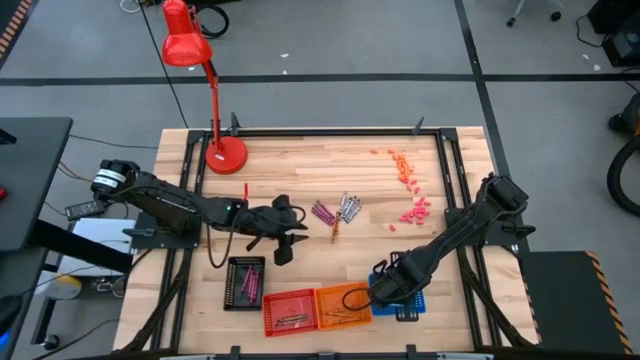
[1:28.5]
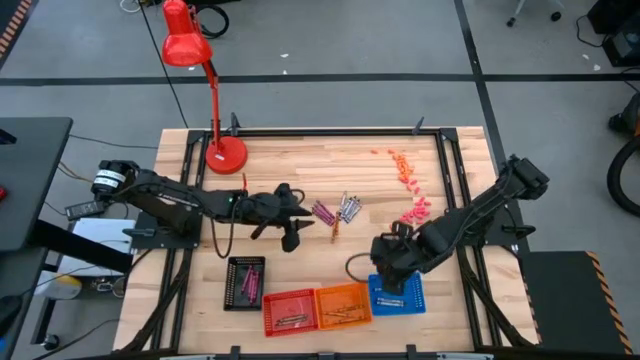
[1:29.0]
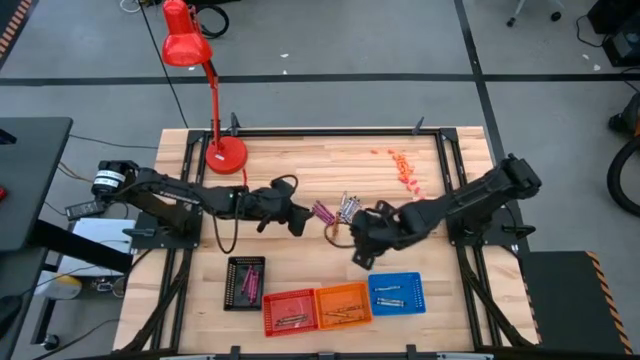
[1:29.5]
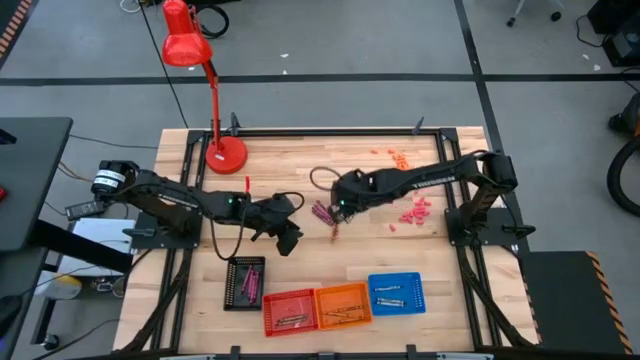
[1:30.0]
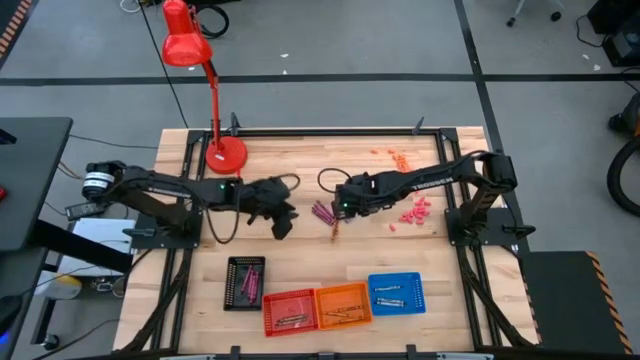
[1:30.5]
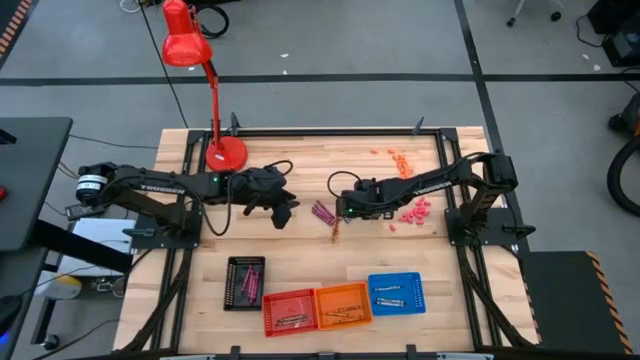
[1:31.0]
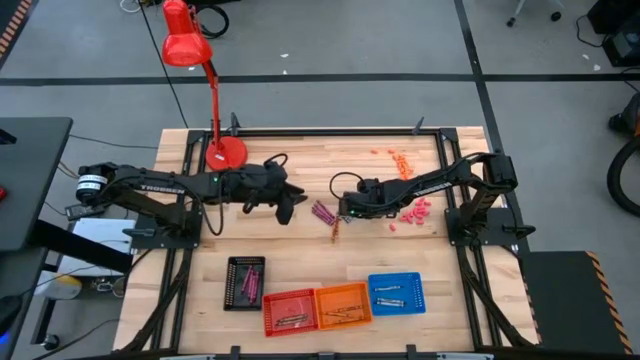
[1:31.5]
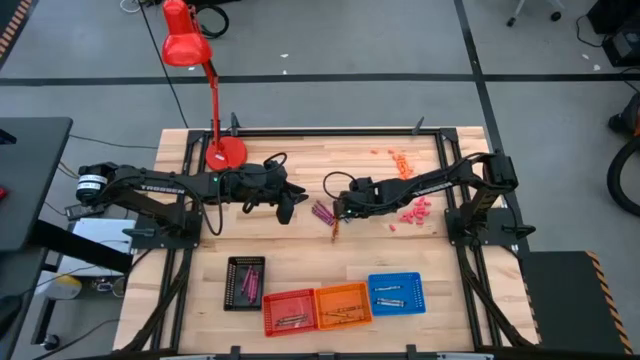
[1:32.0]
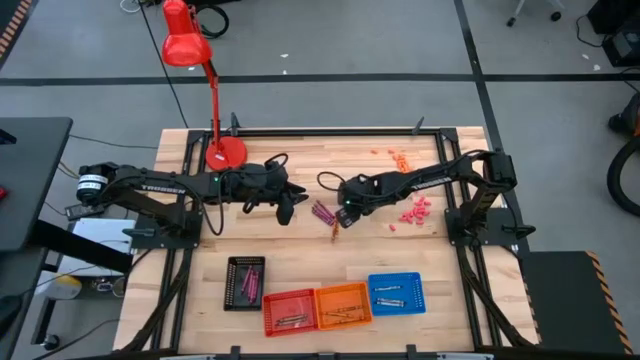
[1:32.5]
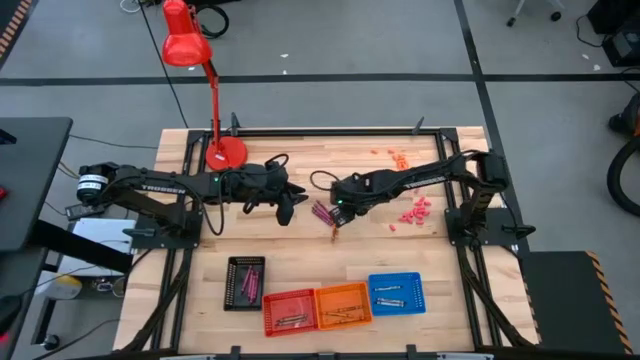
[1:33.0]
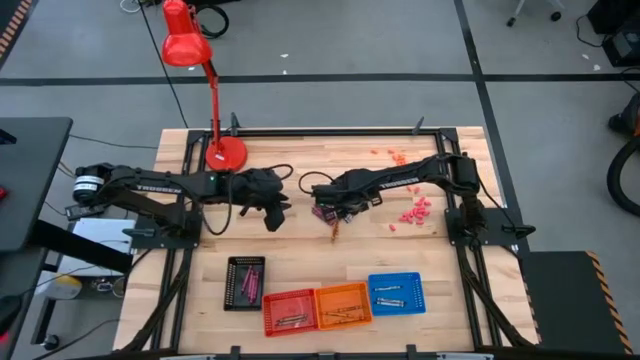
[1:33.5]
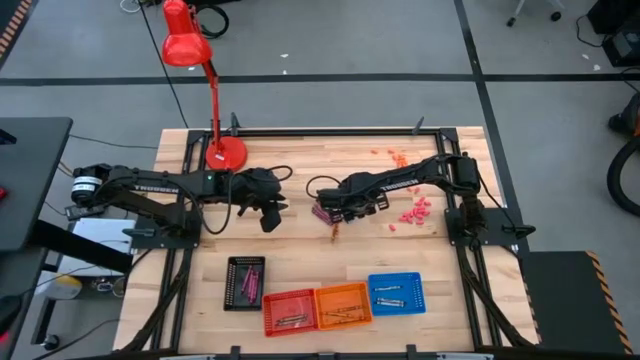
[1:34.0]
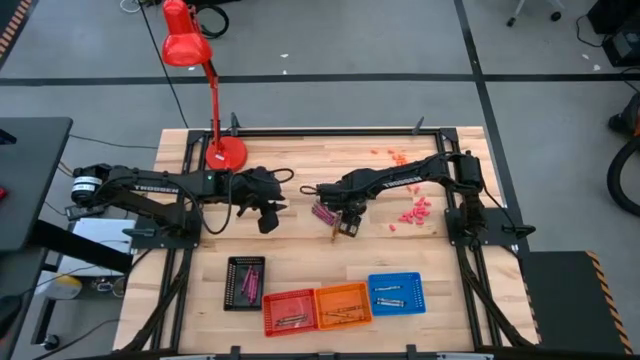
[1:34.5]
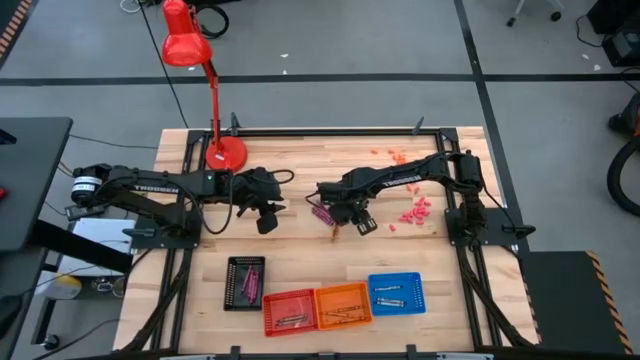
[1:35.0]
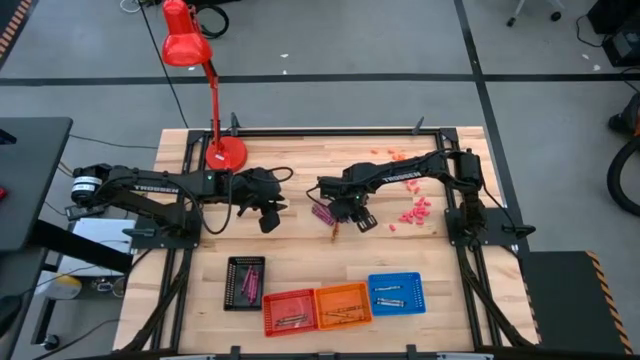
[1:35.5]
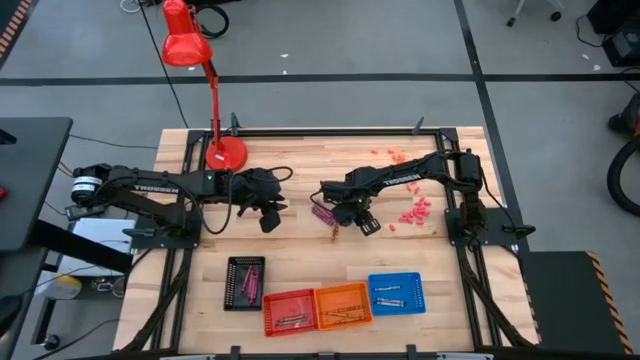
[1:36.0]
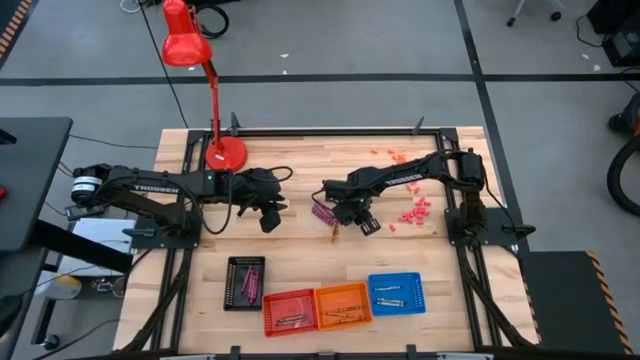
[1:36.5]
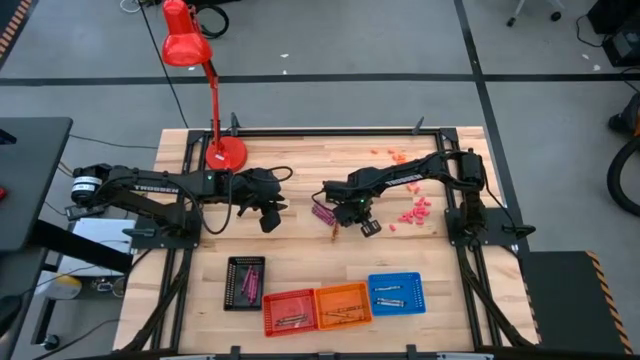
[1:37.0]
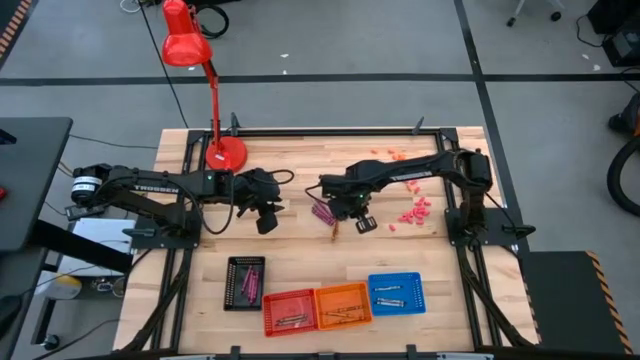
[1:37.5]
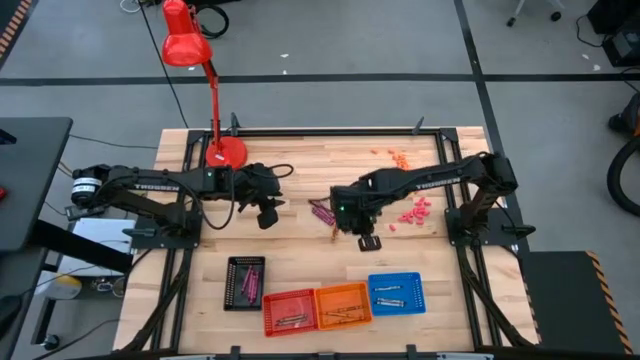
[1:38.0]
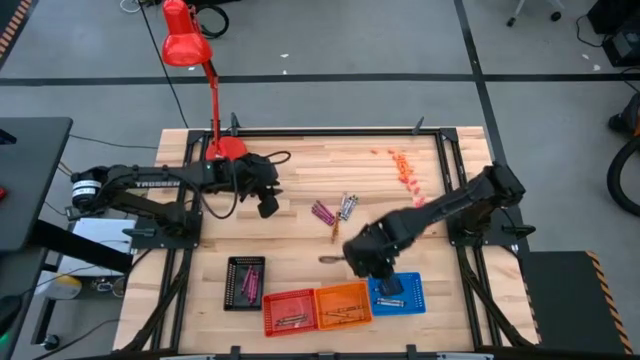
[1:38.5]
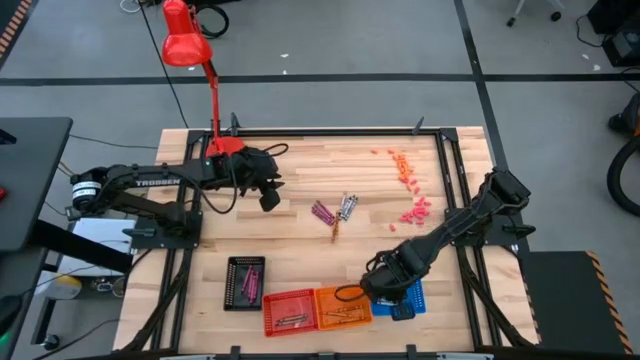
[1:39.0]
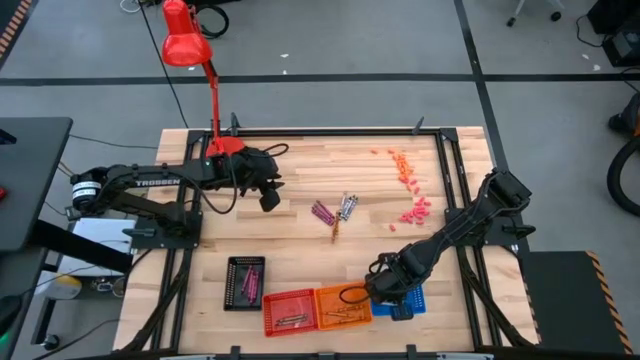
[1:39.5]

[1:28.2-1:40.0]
Task: Sort crayons
Put the black crayon into the blue bin

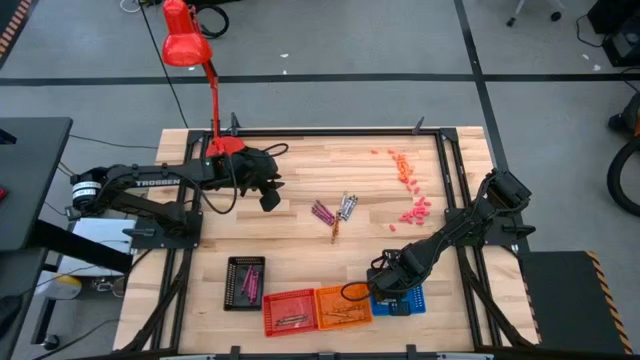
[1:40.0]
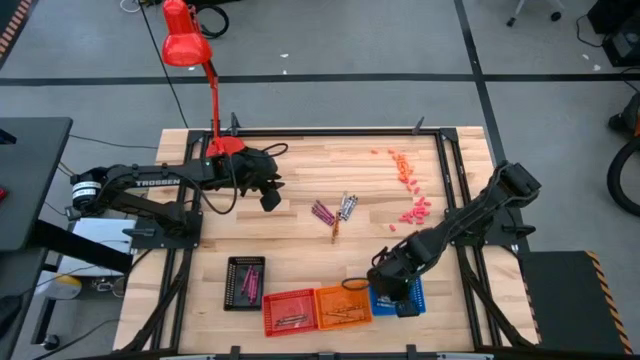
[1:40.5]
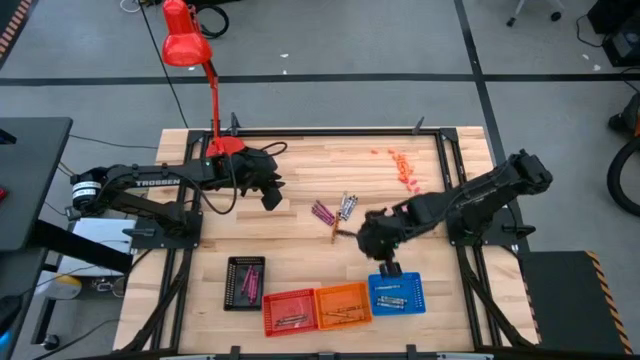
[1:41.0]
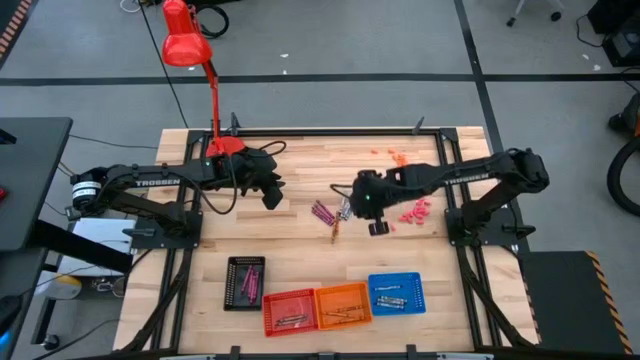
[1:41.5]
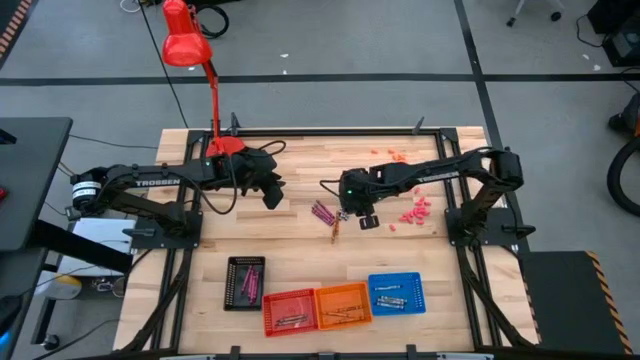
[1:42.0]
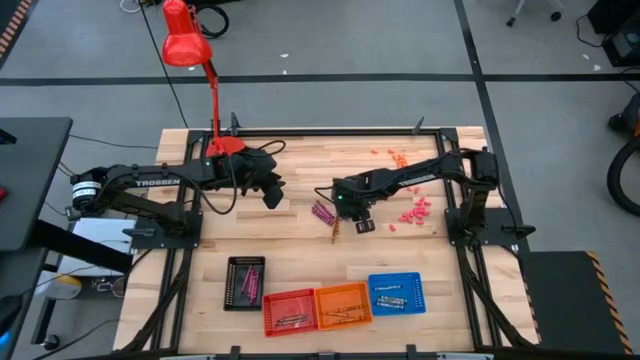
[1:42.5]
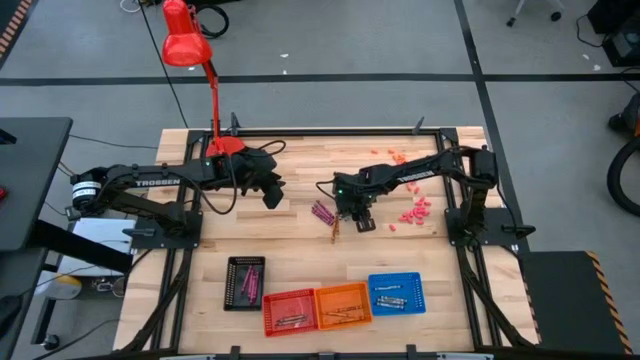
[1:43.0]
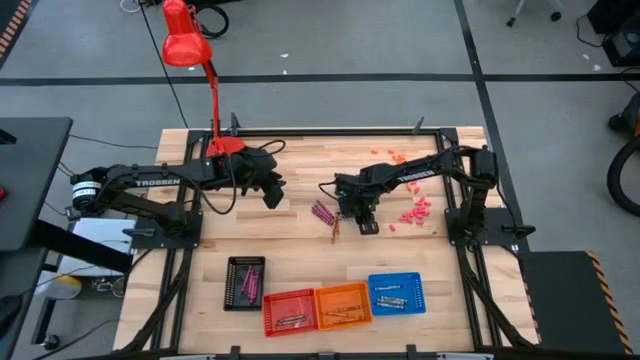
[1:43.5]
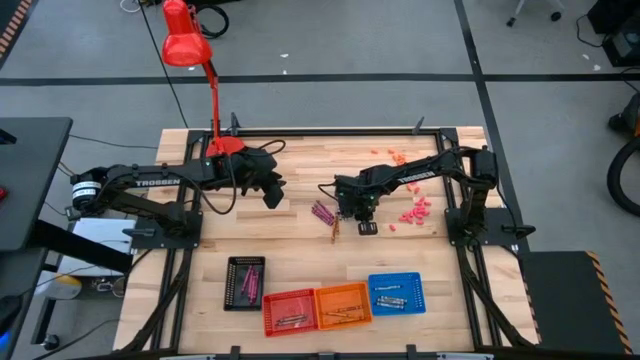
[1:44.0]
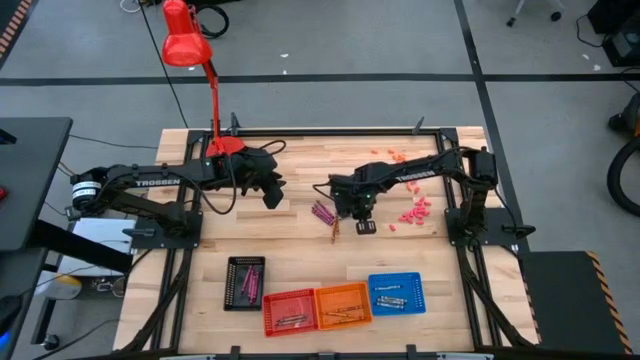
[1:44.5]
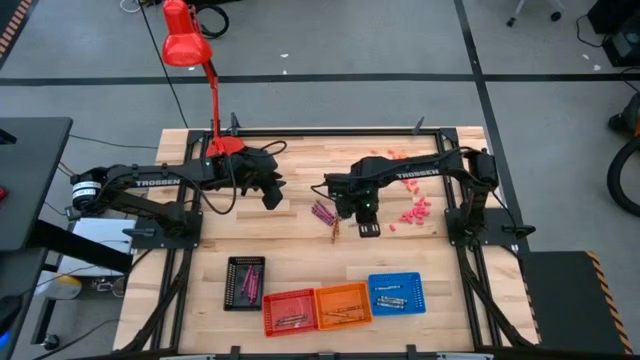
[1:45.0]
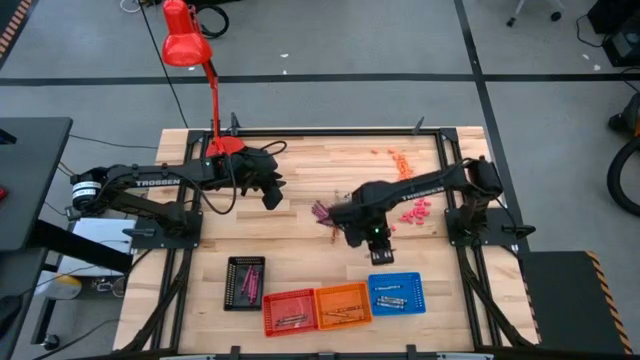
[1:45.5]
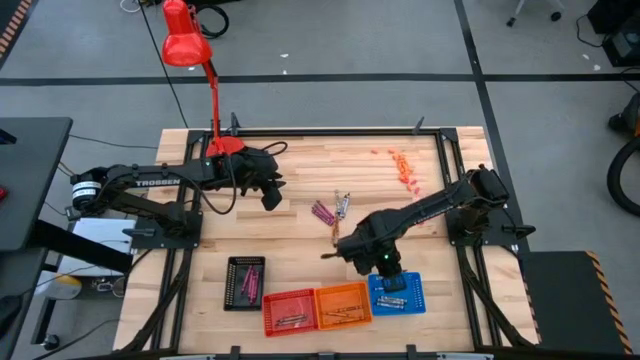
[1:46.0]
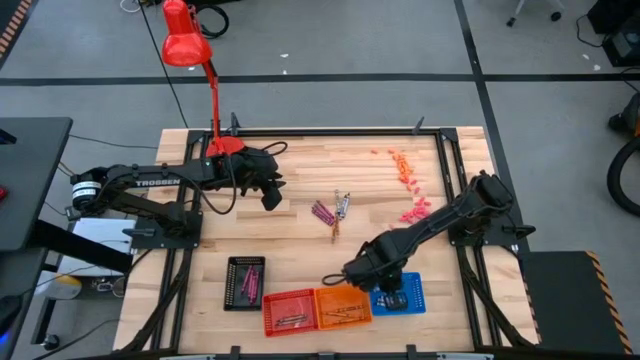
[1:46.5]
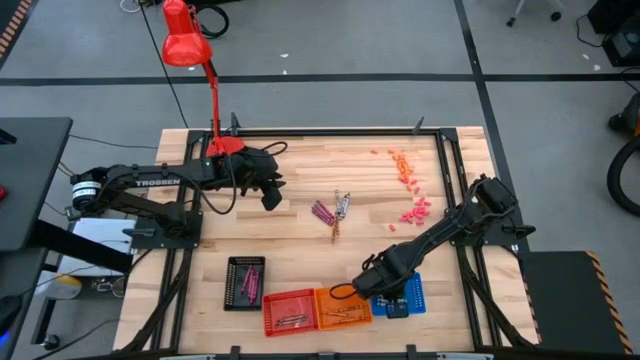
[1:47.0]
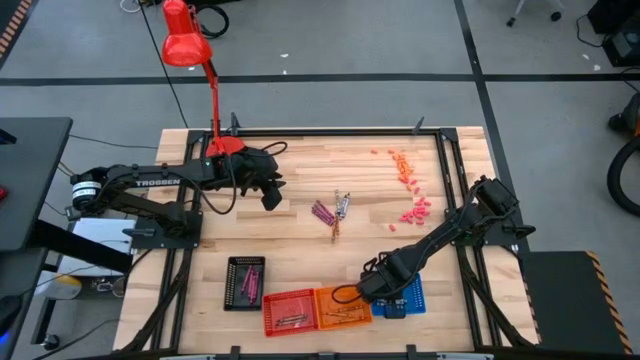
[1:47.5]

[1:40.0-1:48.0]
Put the black crayon into the blue bin

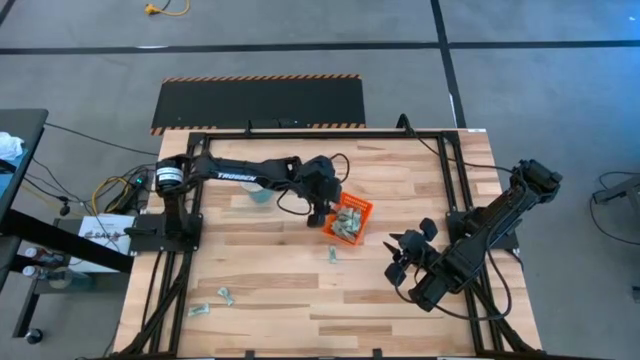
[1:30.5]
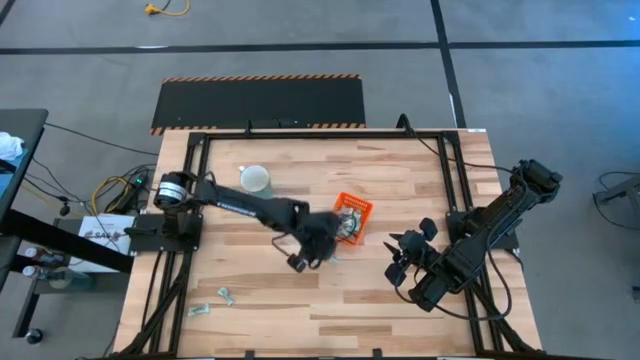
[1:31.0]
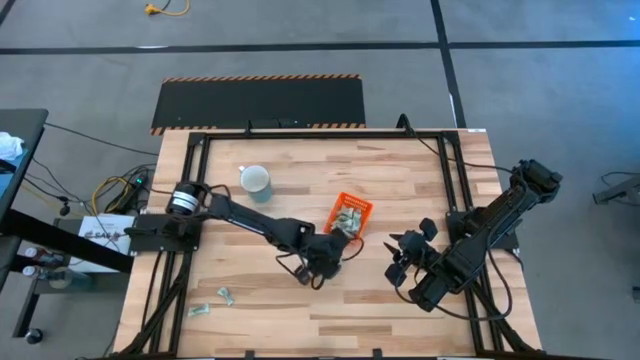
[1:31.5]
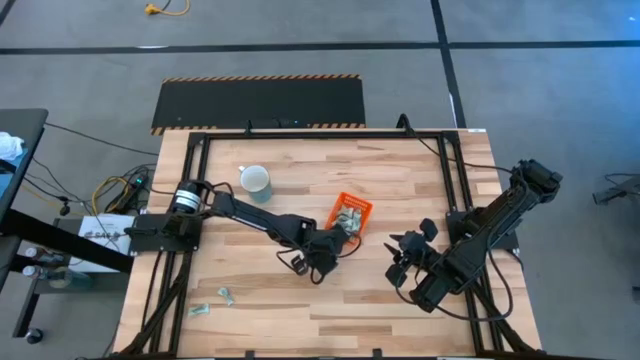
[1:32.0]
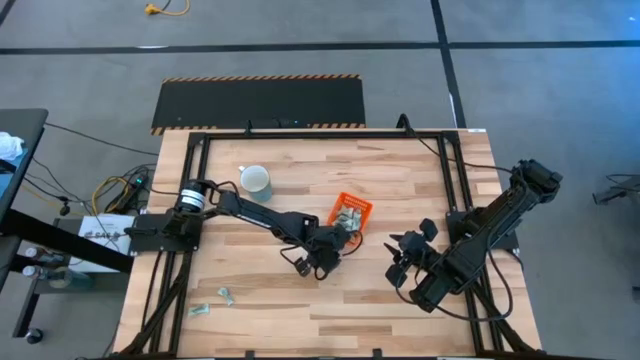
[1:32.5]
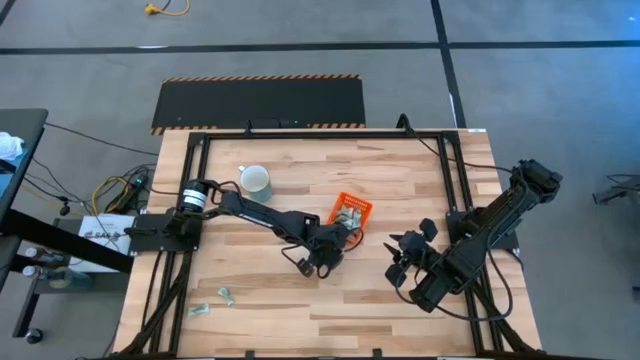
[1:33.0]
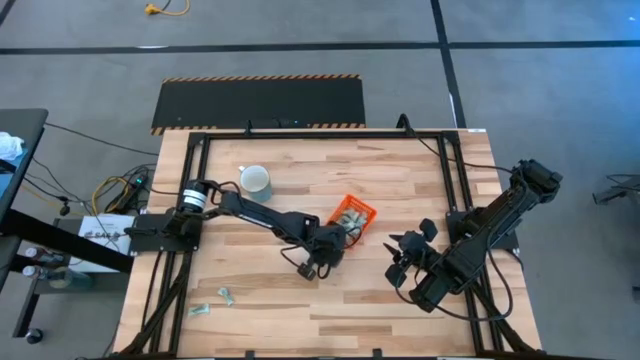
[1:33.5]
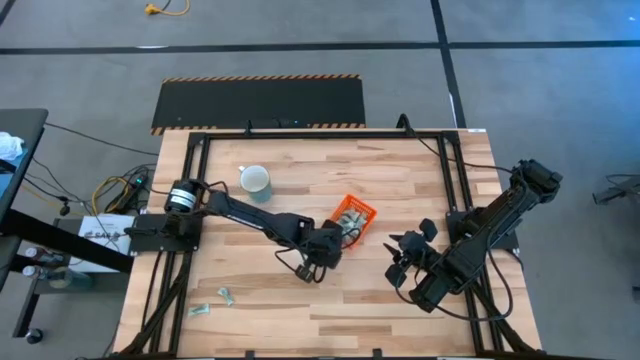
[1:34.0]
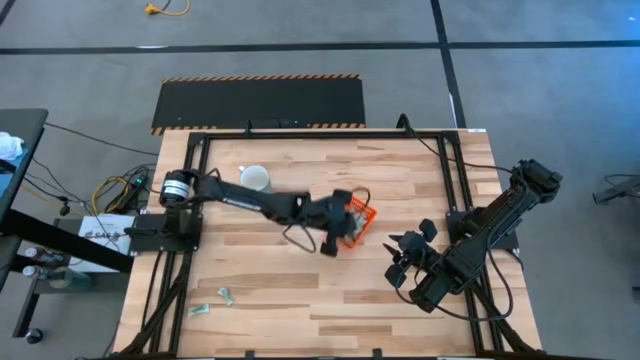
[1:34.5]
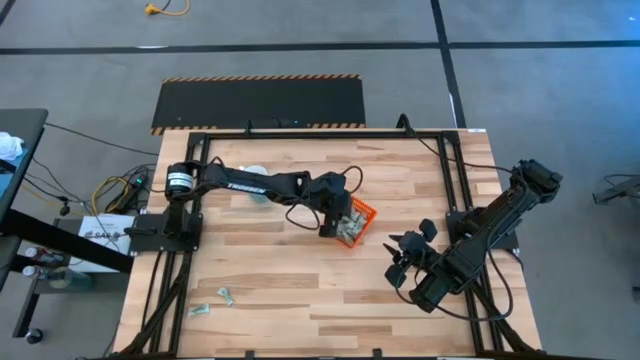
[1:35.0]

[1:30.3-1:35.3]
Task: Pick and place Stevia / Truvia into bins
Put the stevia packet into the basket
